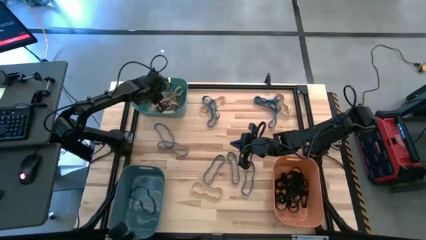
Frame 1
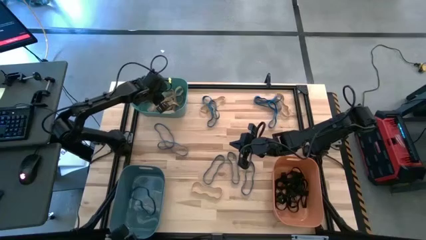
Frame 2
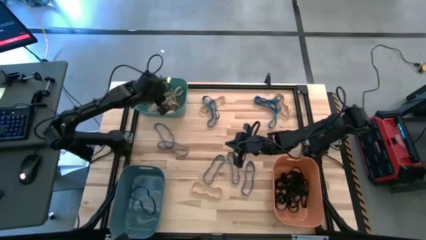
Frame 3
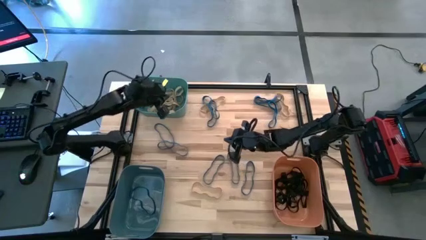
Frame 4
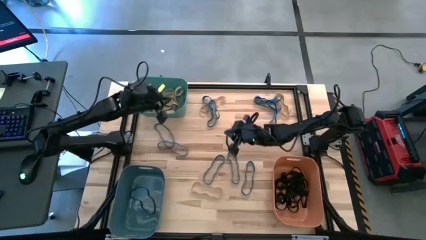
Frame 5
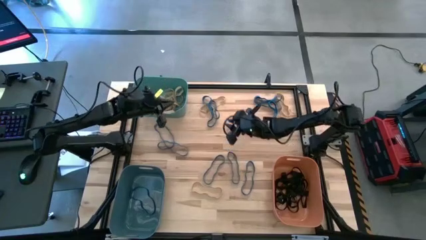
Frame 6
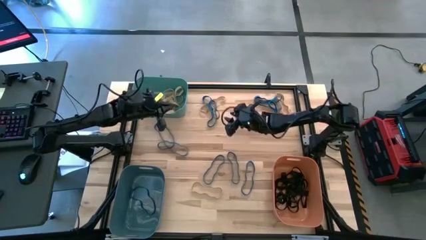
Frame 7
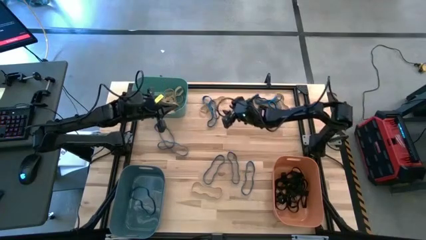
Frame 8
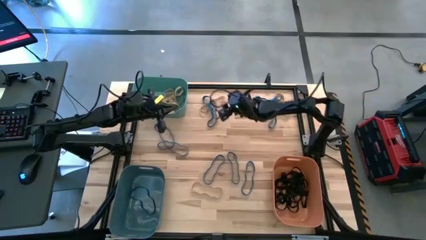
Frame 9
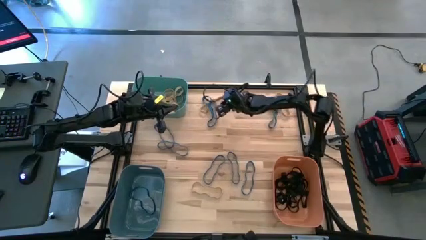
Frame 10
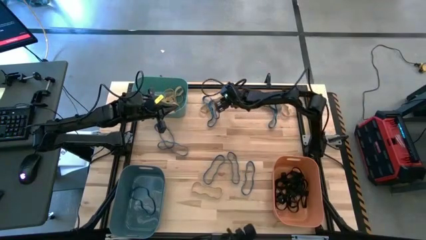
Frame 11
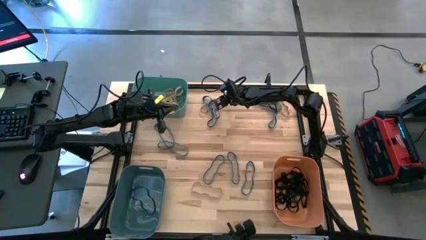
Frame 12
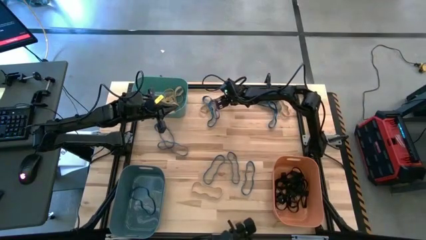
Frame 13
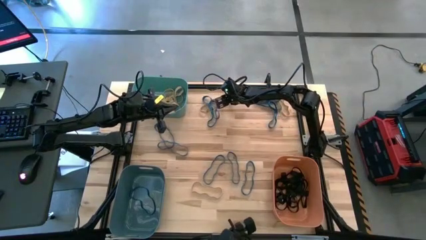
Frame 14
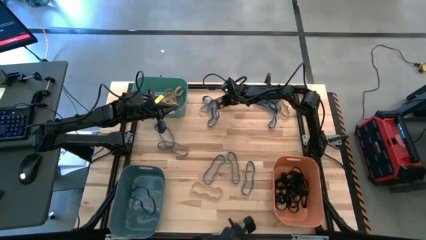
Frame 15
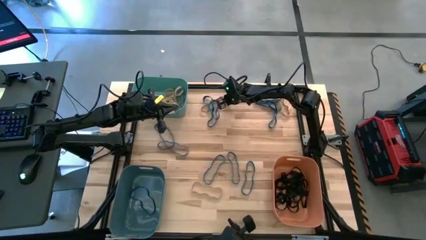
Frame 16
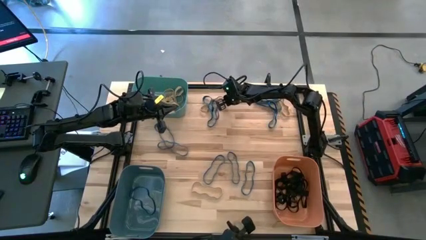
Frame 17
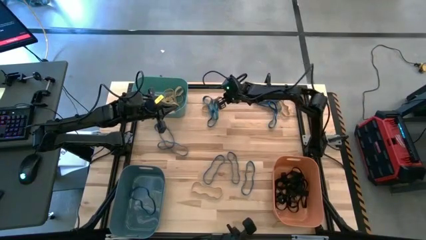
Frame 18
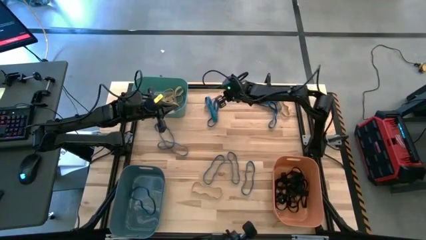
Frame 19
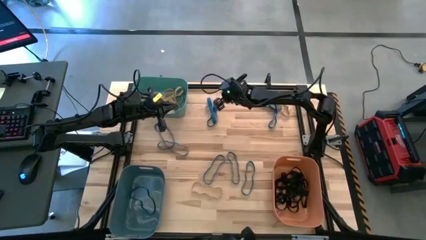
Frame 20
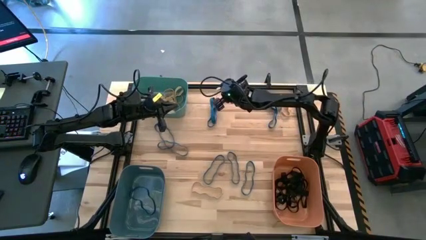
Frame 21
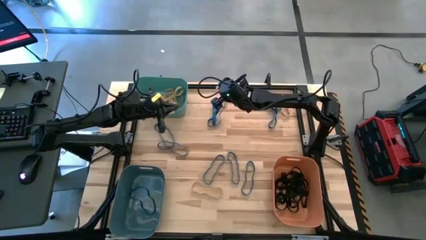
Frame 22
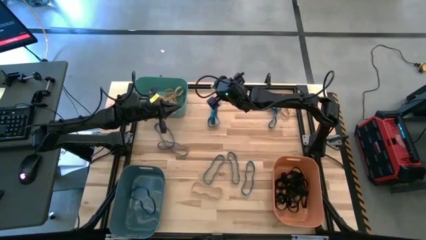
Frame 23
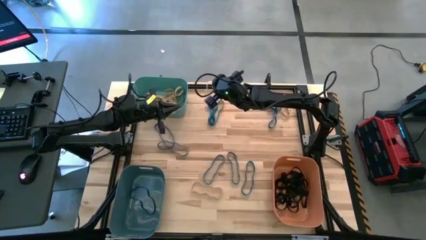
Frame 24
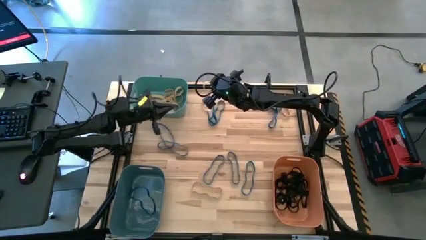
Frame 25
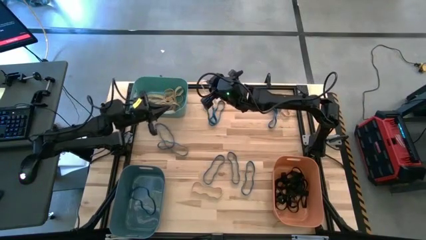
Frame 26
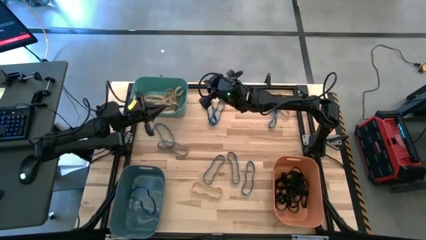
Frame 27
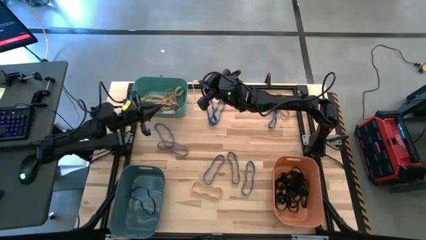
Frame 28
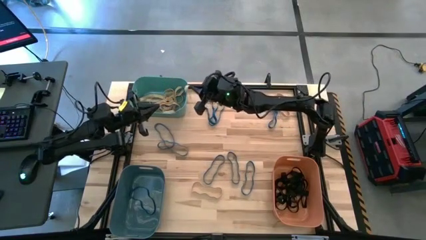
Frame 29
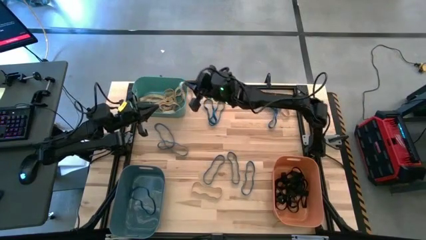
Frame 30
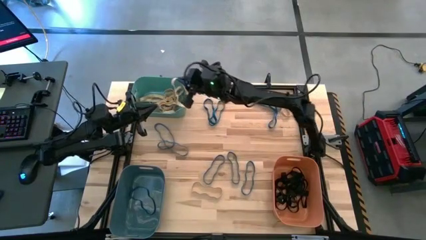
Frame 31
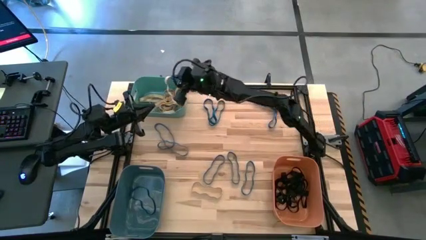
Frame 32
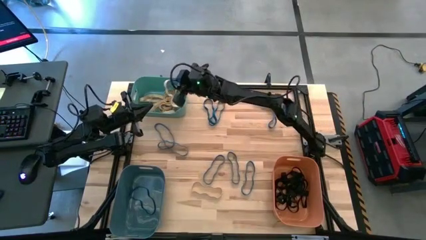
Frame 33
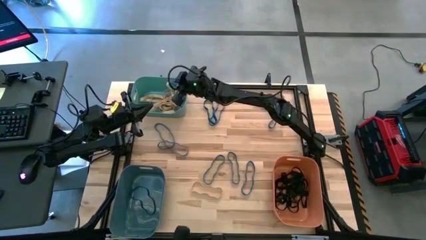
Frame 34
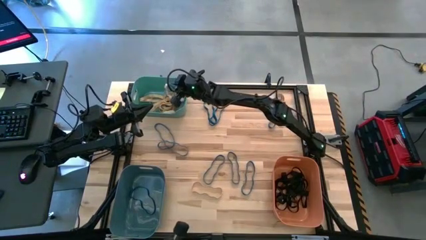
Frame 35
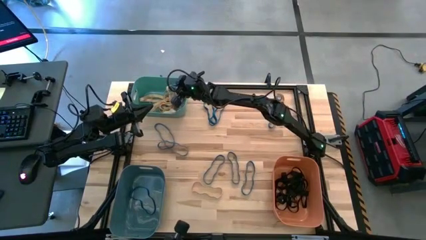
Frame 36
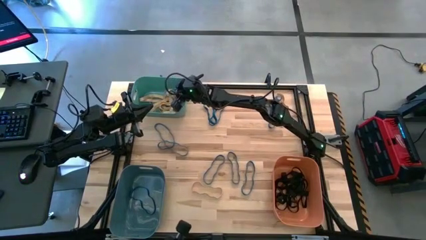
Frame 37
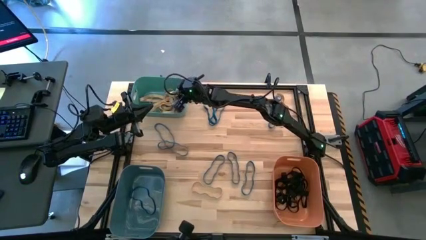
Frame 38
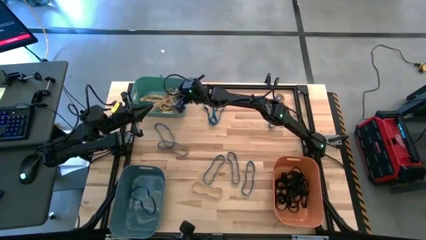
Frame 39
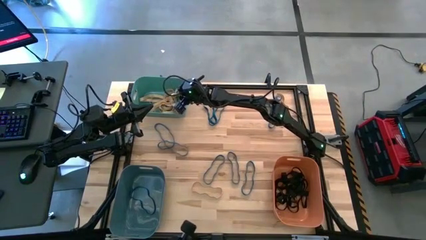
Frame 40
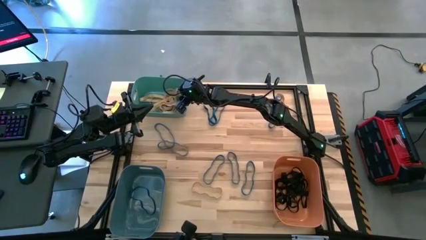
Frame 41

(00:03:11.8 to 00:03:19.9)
Task: Sort rubber bands into baskets
Put the brown rubber band into the green bin

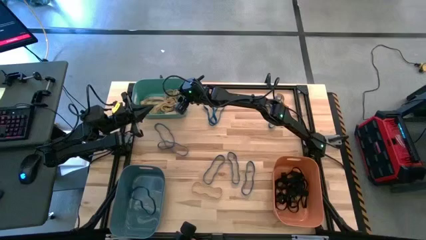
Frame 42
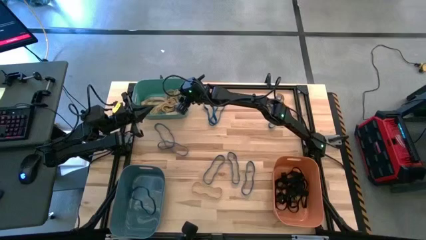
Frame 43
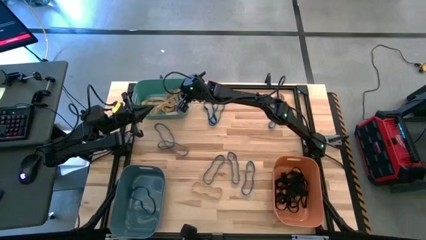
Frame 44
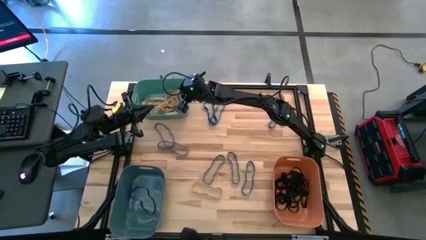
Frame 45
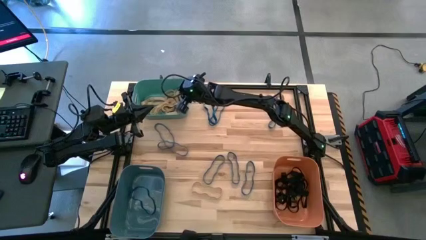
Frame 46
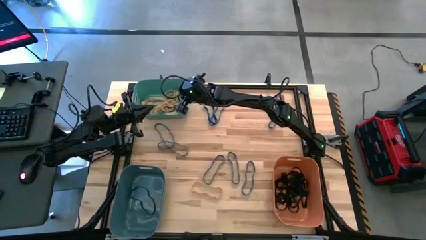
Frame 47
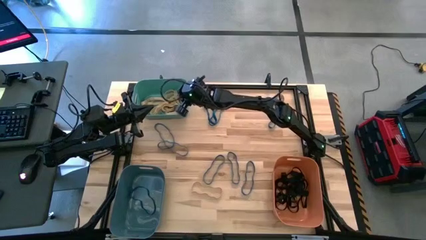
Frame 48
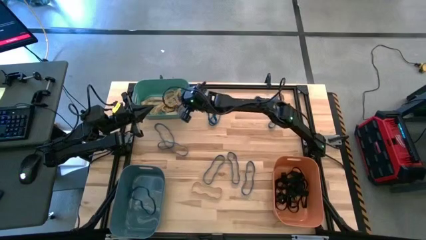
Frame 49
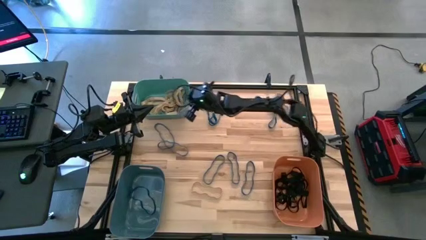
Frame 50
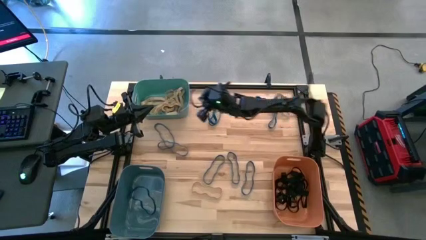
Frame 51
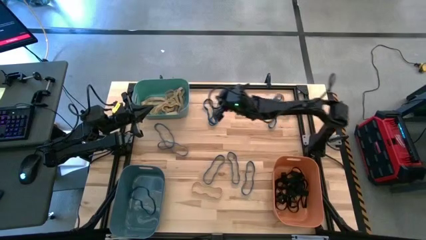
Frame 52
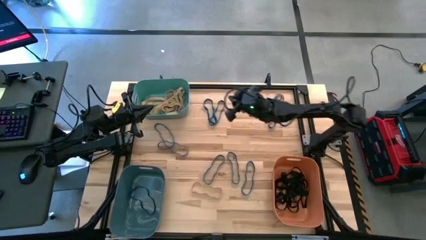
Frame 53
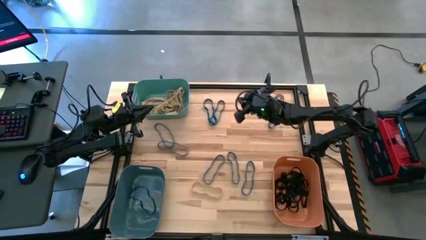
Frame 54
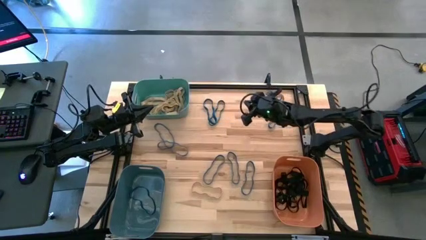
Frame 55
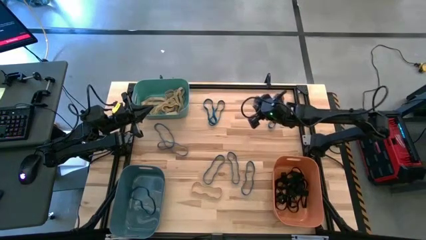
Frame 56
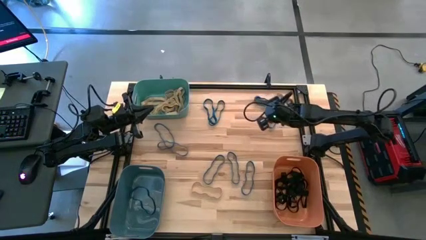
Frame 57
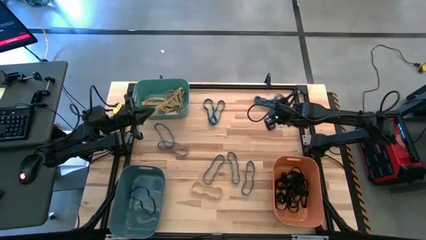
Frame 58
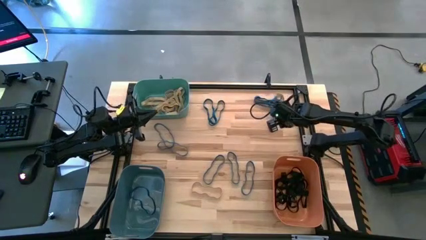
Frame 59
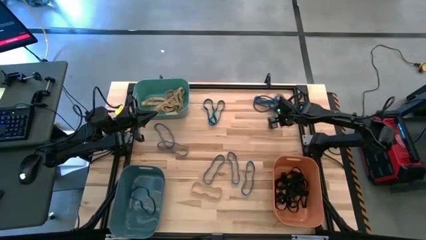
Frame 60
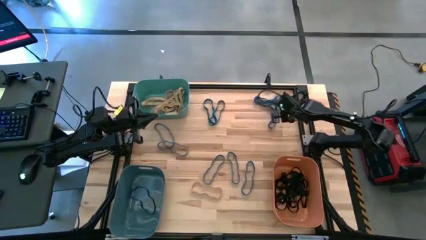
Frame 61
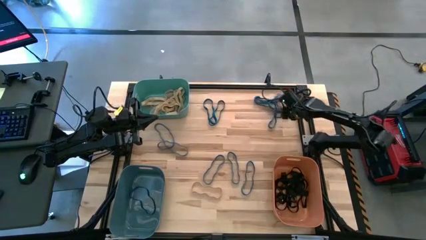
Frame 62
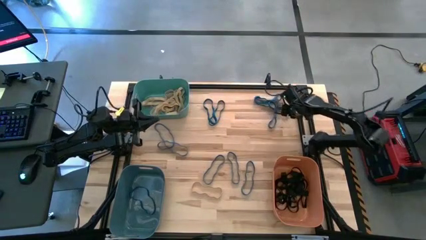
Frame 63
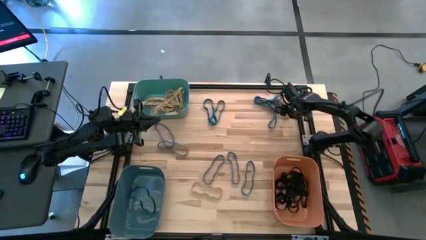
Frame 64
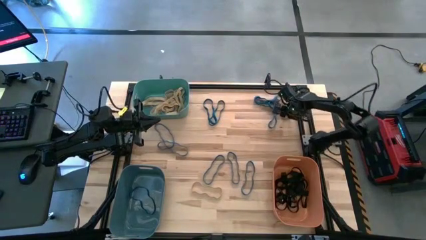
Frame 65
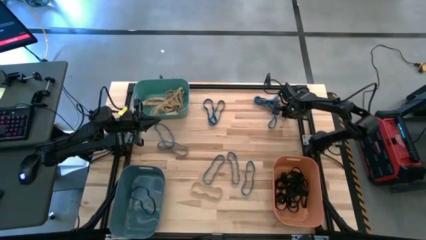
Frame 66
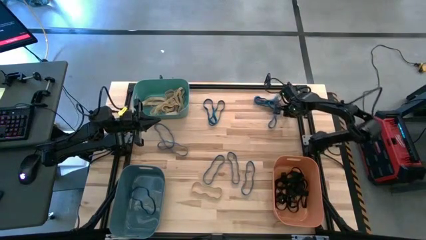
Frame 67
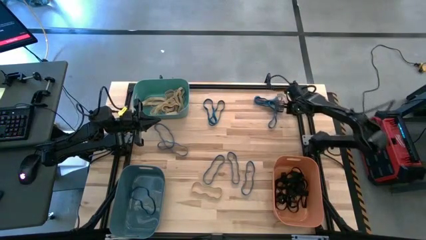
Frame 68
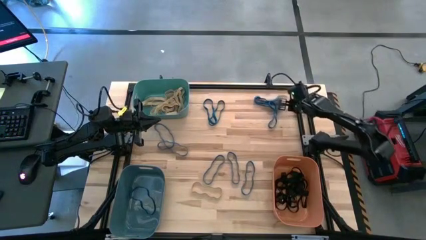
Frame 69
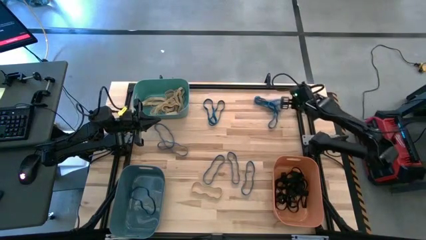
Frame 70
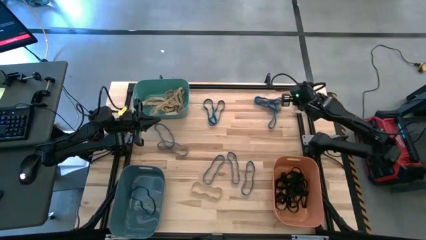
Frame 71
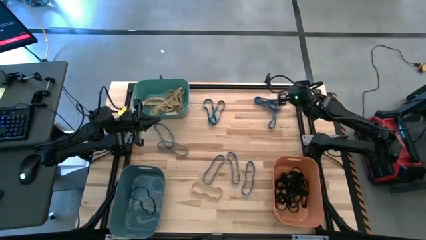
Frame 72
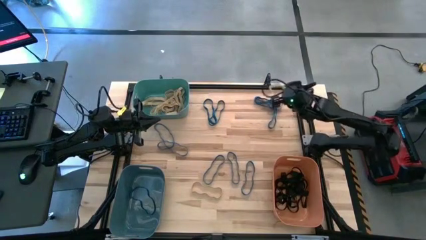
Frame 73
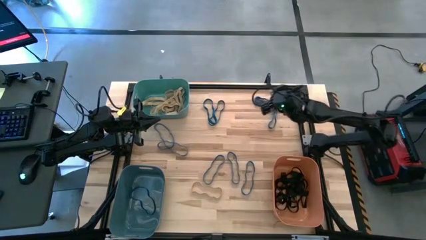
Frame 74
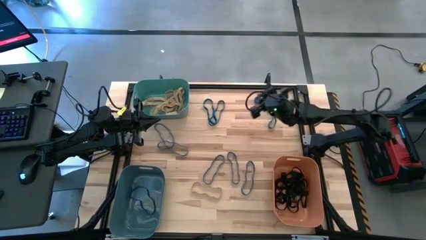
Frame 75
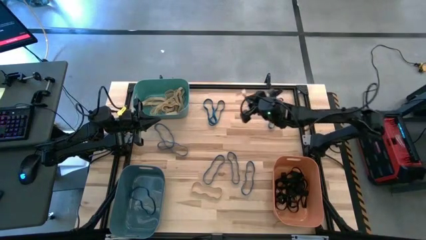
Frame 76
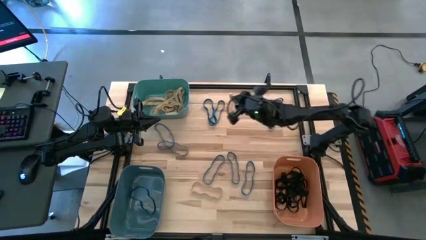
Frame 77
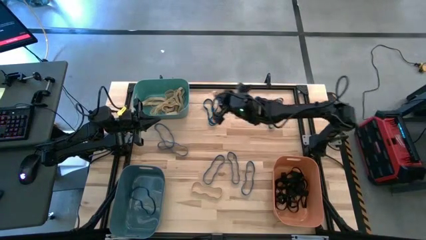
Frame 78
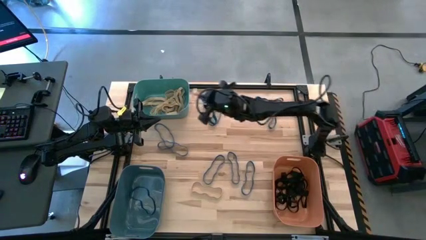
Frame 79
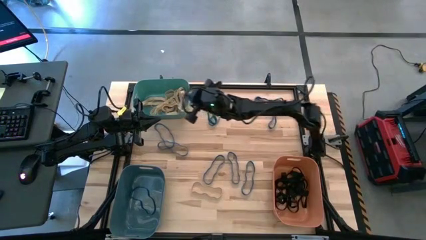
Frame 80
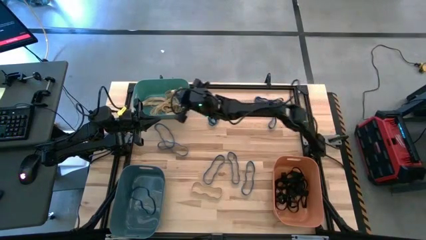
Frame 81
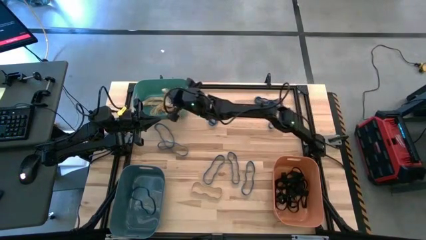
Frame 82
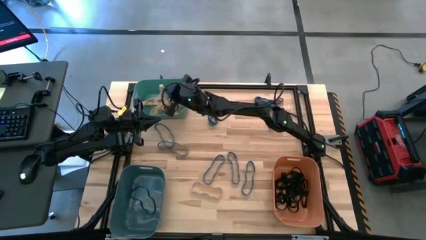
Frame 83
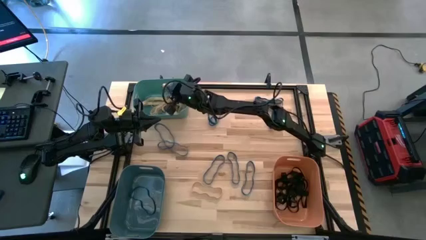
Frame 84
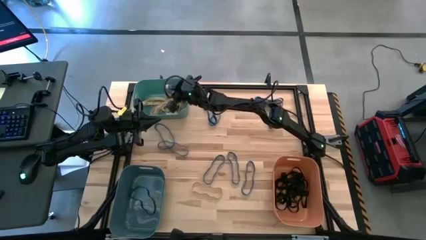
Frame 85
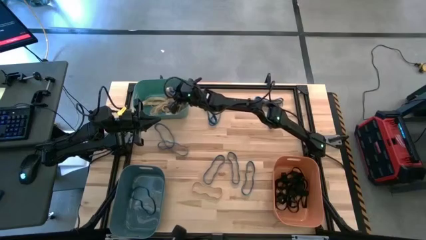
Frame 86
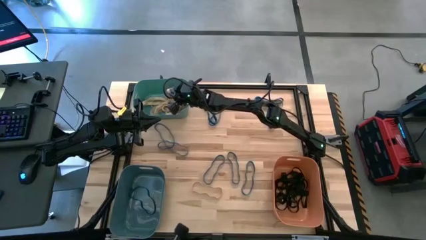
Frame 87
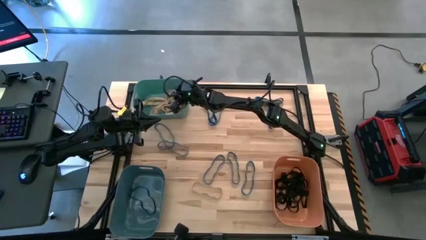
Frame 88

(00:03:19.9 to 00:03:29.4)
Put the brown rubber band into the green bin
